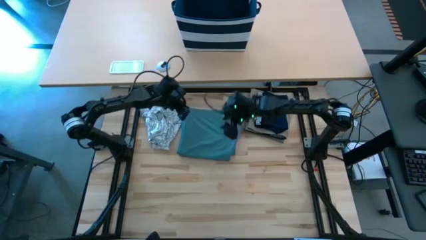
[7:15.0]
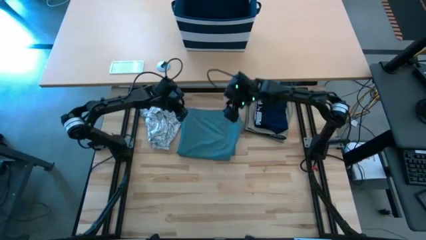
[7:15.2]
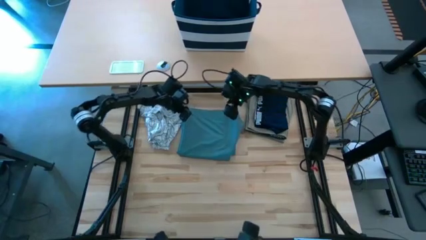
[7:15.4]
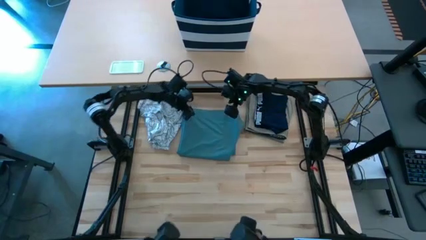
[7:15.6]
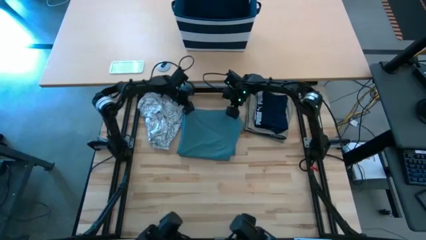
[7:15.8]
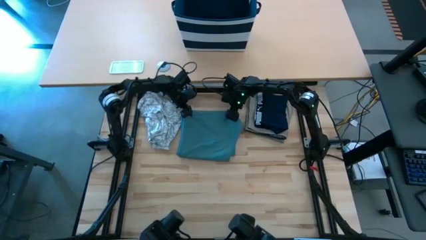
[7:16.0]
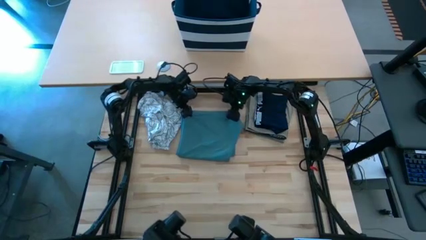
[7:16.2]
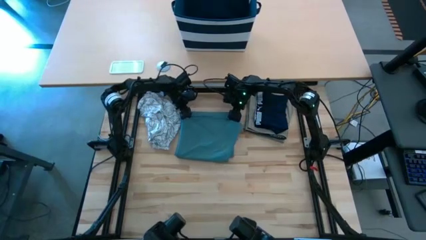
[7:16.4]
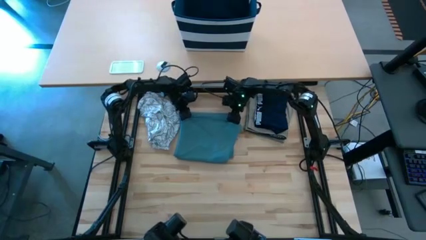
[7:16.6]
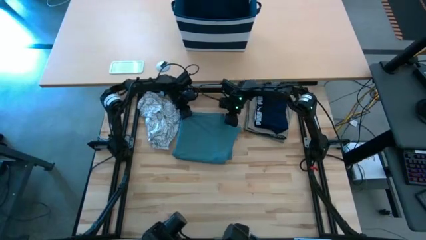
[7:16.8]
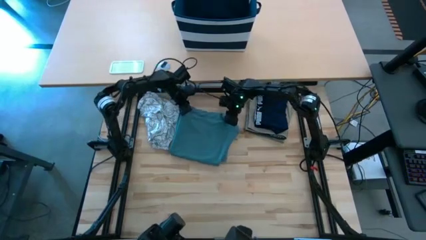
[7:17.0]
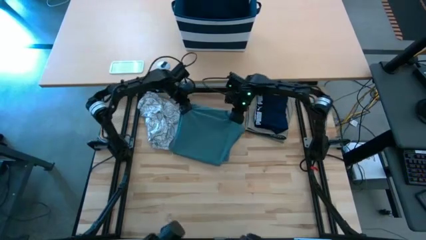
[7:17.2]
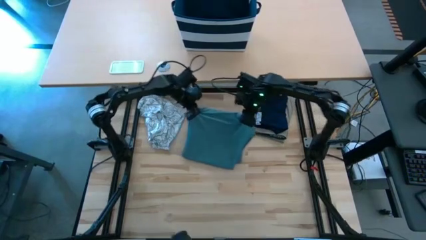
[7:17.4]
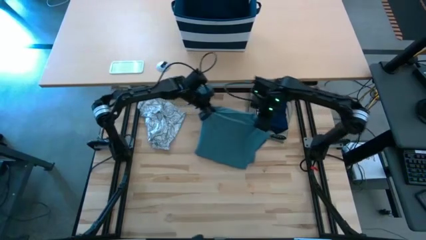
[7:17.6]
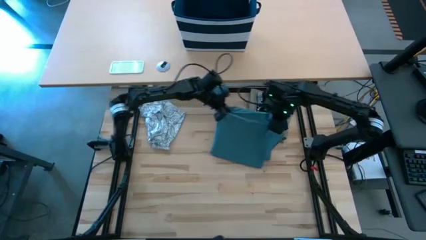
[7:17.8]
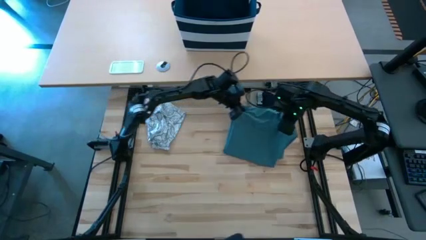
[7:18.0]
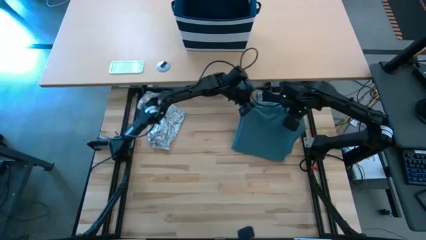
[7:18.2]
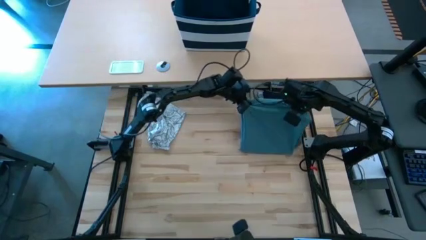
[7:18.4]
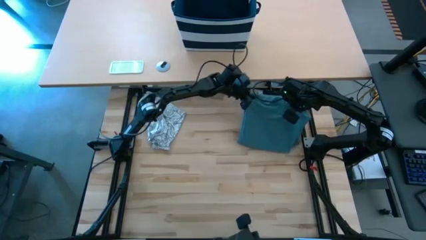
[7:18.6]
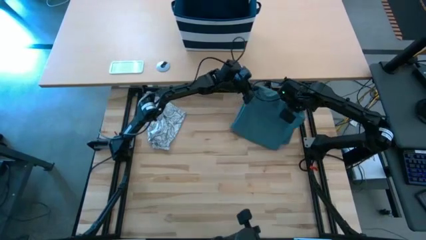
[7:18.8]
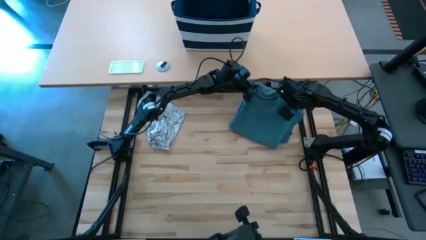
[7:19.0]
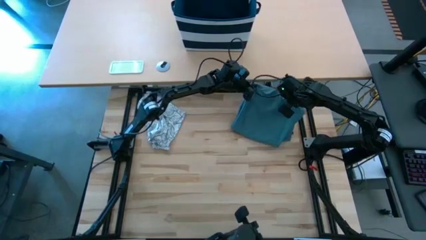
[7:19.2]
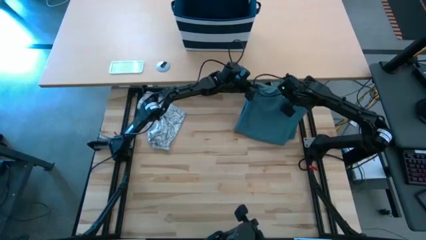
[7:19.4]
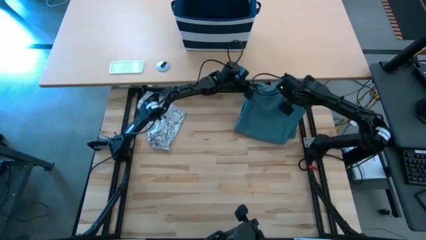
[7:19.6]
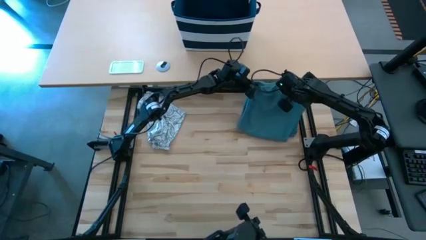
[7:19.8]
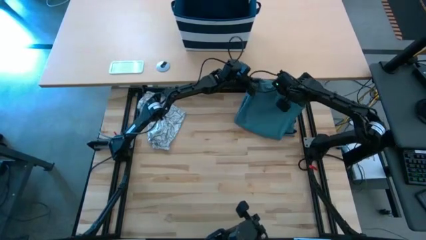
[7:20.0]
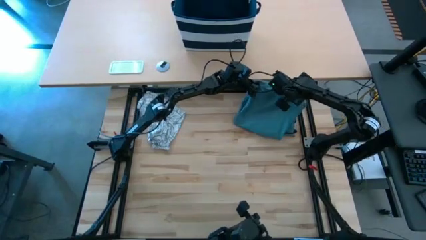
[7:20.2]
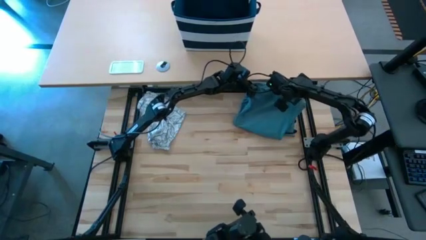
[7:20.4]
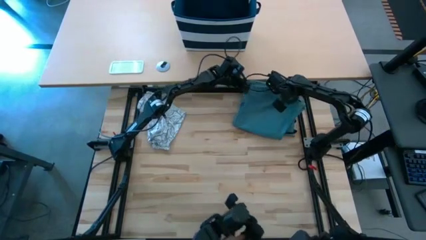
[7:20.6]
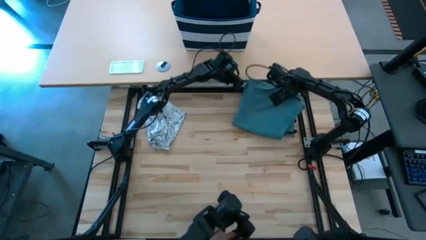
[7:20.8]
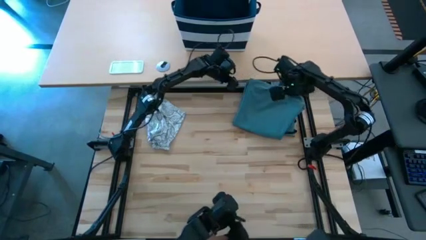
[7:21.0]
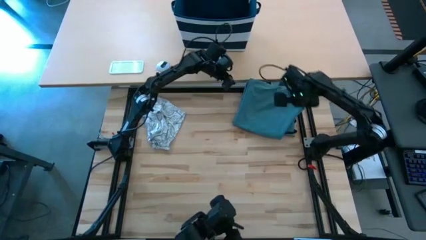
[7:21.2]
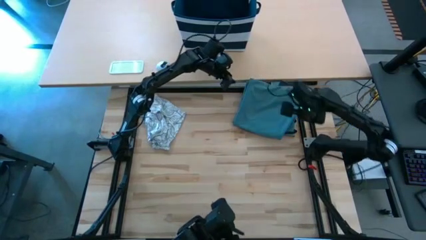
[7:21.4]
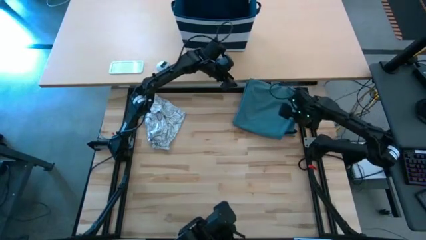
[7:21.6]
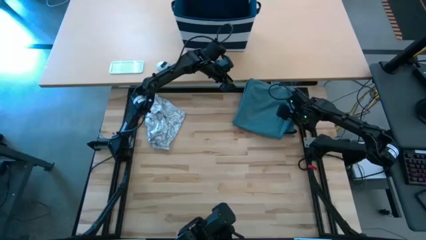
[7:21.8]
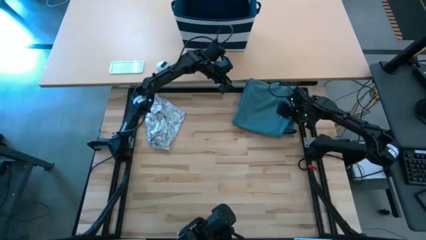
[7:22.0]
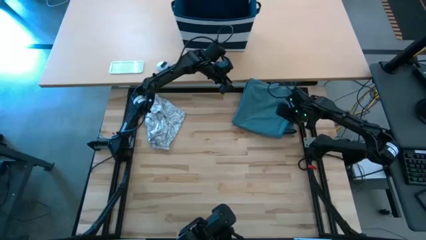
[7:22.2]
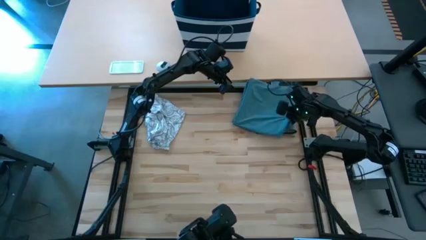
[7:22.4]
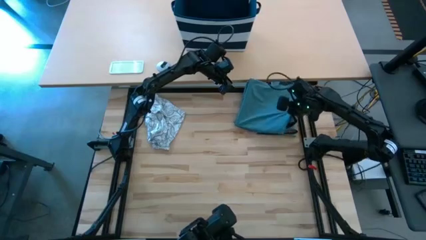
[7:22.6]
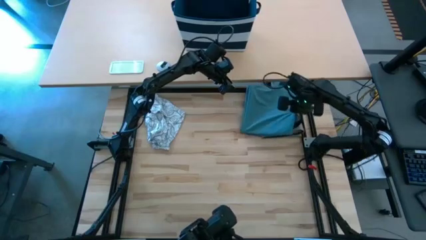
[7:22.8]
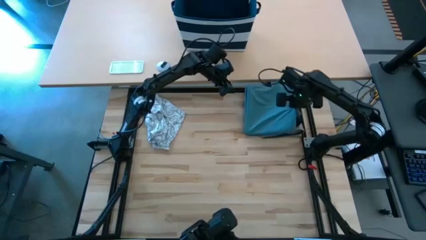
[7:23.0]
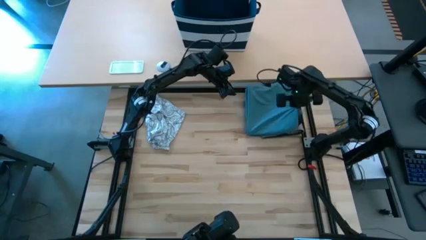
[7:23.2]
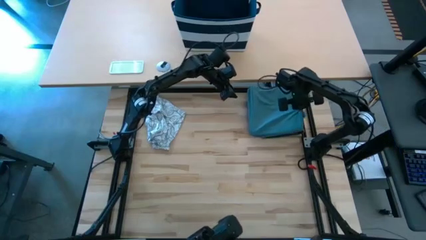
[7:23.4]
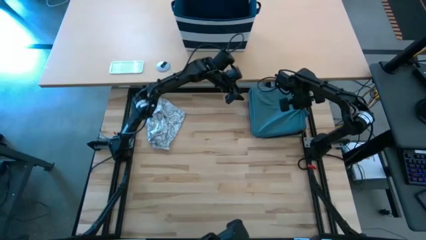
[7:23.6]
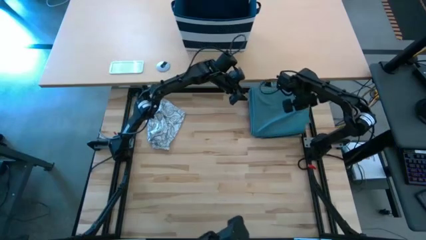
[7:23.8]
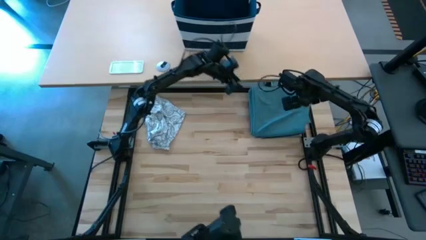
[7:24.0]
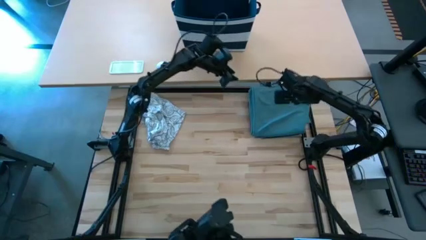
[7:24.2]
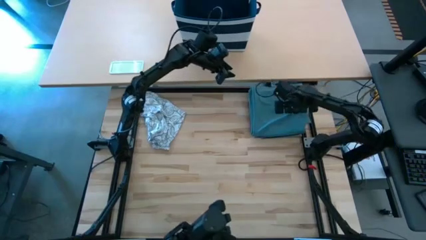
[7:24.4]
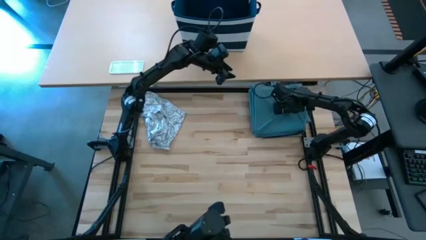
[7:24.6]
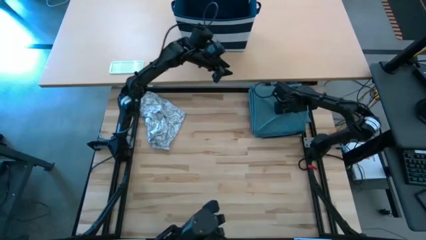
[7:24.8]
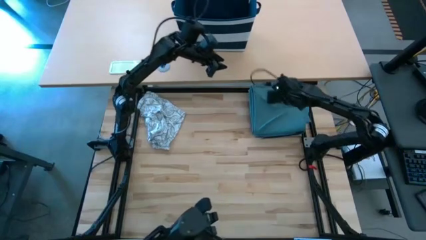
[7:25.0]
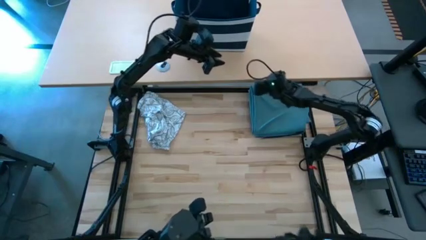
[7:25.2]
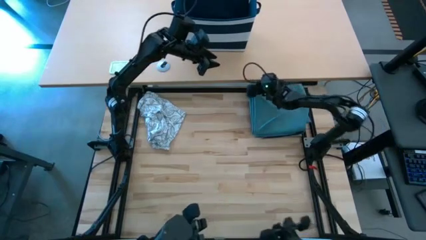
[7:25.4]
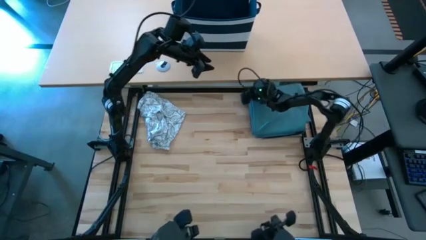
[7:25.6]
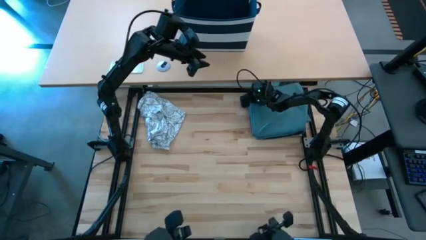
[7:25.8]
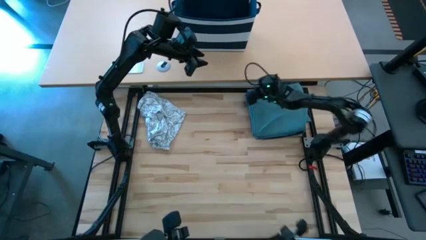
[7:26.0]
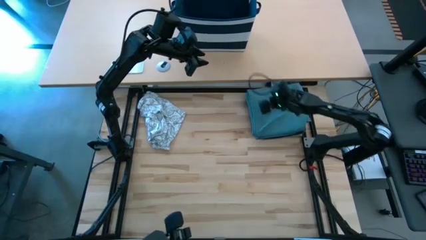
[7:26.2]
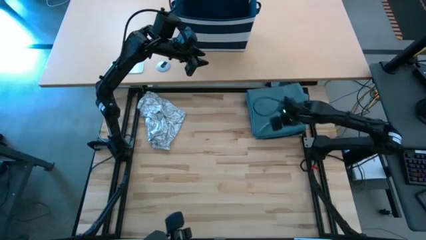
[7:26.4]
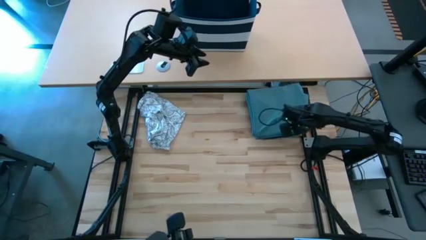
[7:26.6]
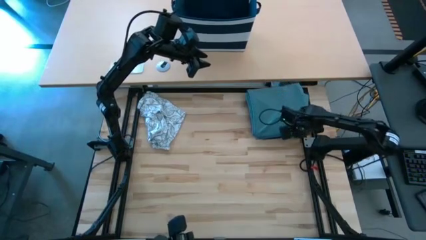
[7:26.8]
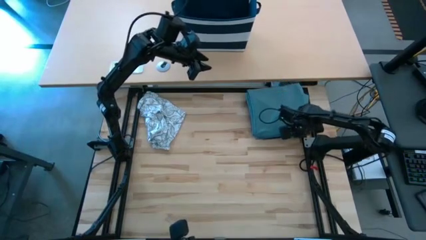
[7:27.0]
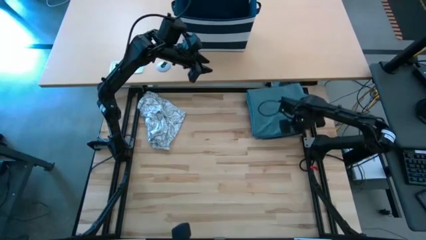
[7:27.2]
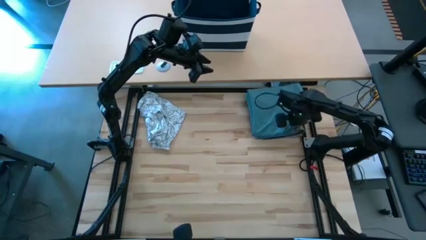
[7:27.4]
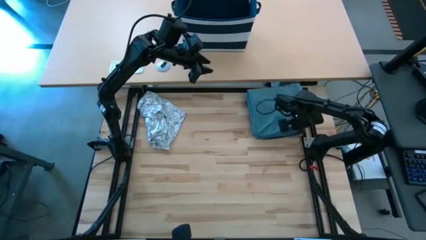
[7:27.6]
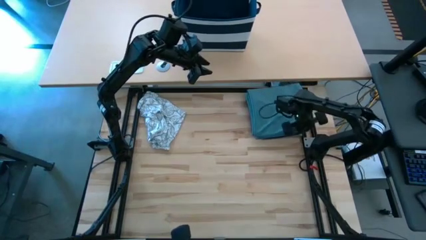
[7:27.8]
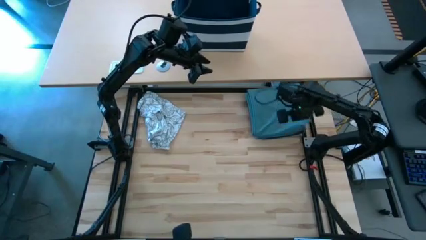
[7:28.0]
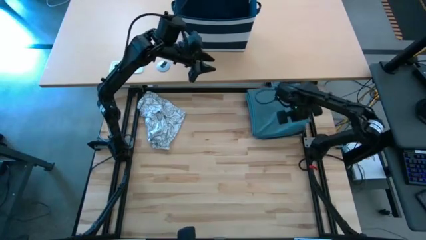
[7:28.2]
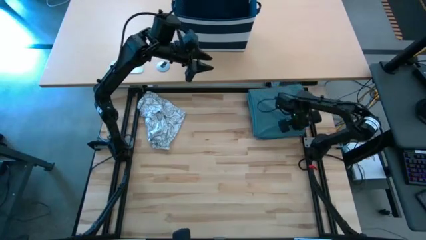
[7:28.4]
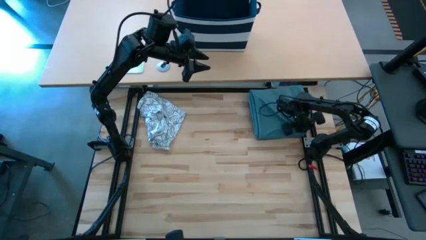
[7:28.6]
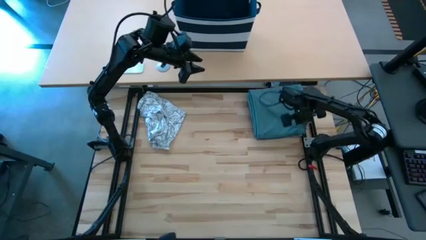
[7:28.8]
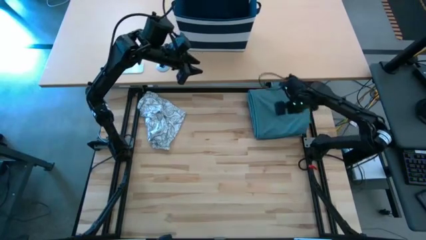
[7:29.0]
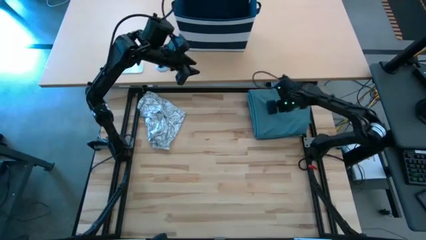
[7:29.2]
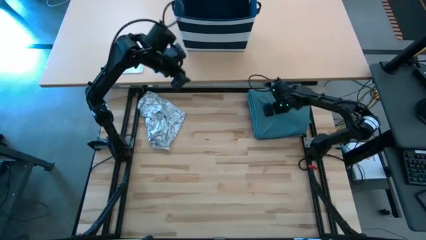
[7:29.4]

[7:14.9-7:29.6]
Task: Fold Laundry from Bin
Stack the folded blue pants on top of the folded blue boxer

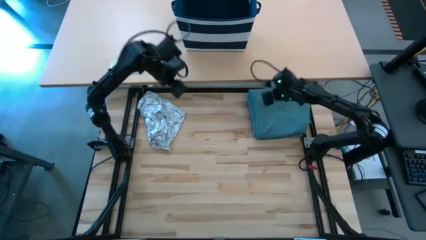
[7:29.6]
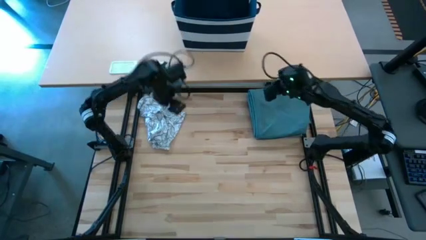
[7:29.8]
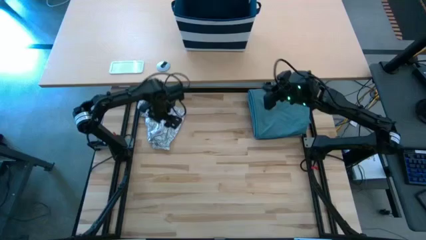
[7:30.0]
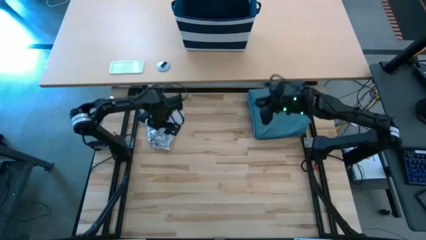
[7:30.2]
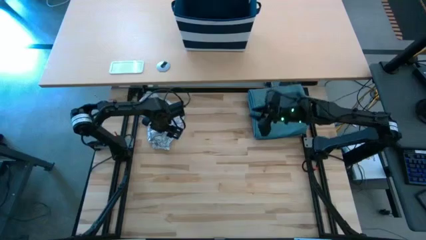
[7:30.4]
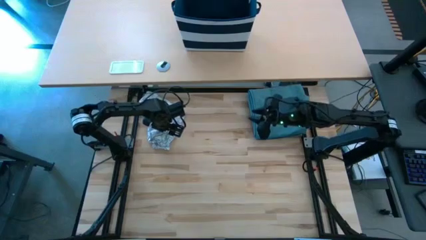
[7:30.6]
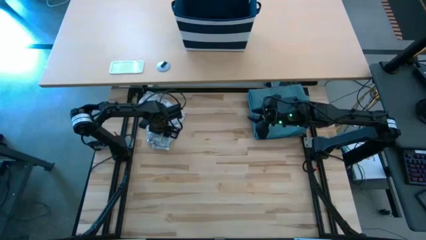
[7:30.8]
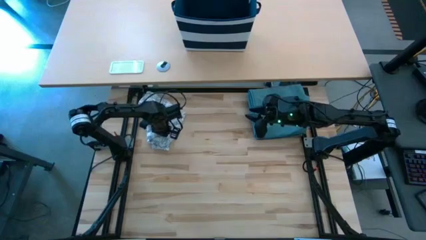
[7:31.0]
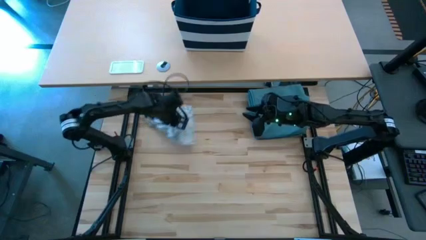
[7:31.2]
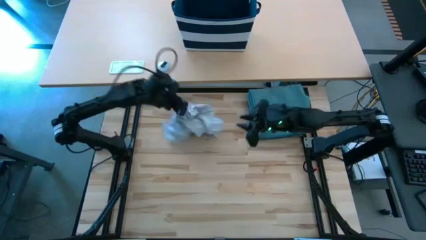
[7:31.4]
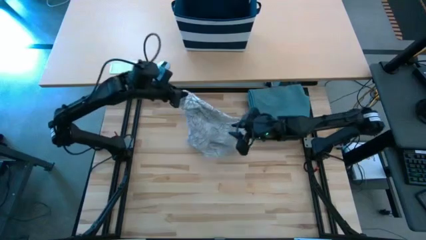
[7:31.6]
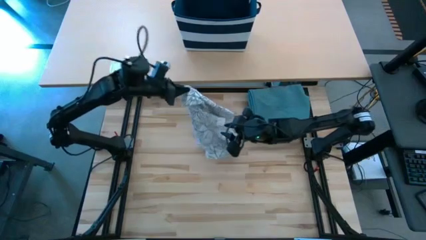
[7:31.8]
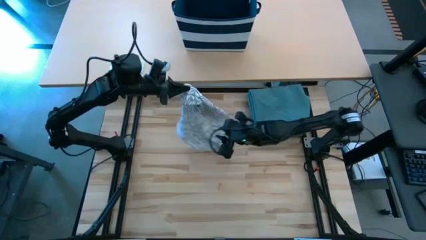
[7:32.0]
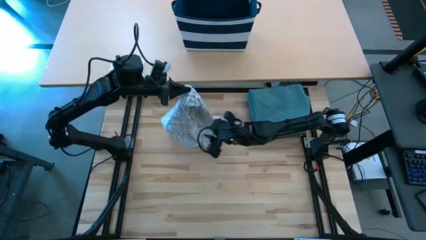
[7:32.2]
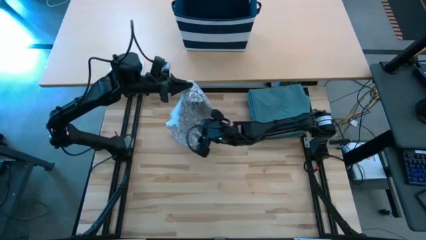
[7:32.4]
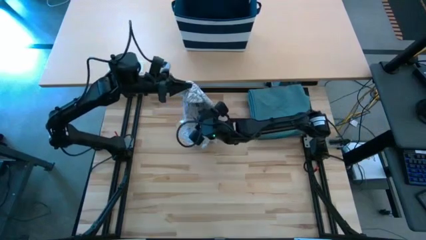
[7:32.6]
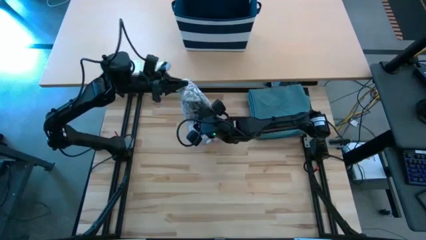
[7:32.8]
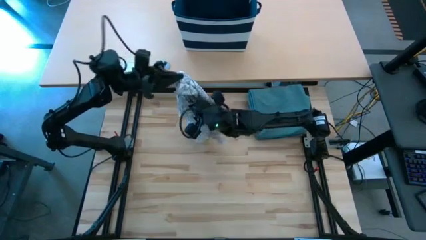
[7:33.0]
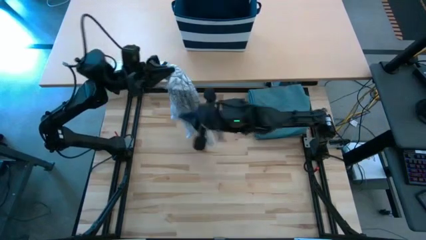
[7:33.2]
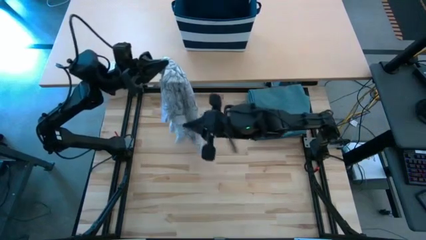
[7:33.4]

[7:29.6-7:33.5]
Fold the white shirt
